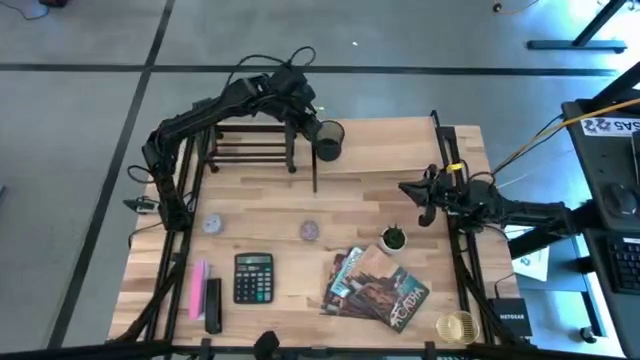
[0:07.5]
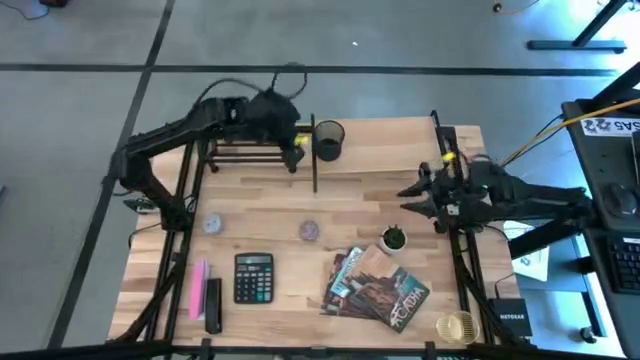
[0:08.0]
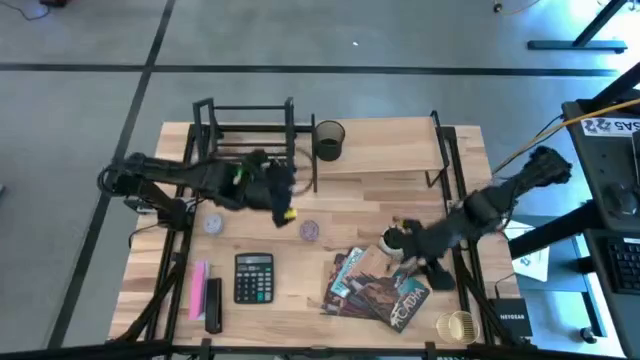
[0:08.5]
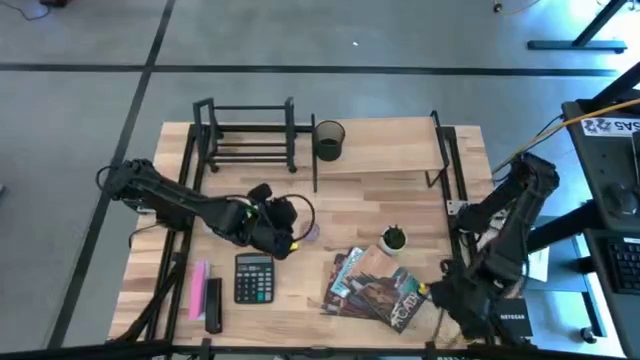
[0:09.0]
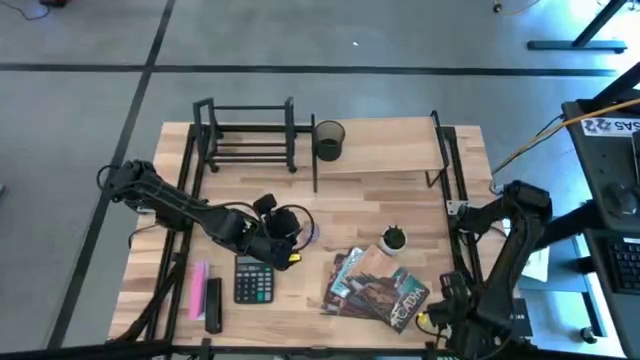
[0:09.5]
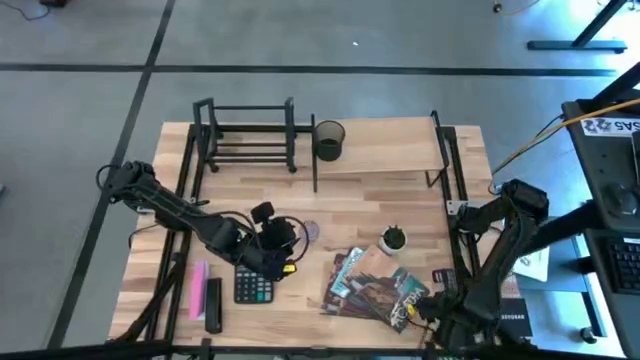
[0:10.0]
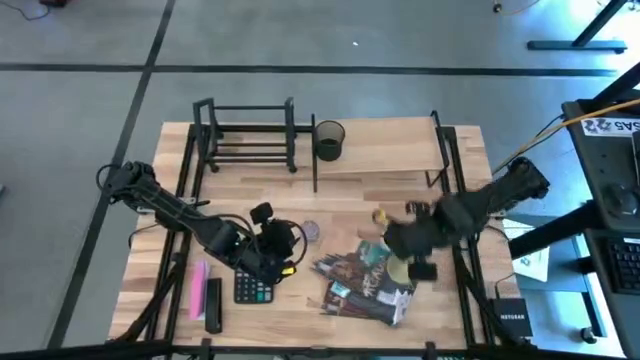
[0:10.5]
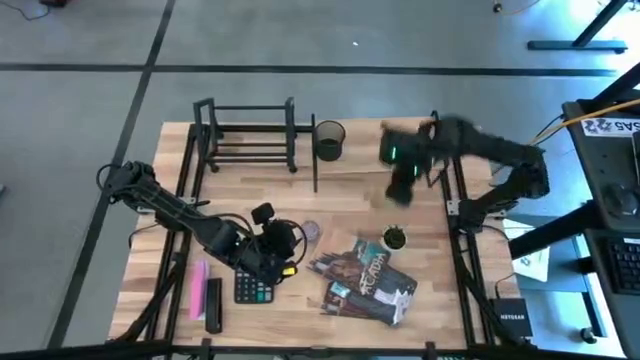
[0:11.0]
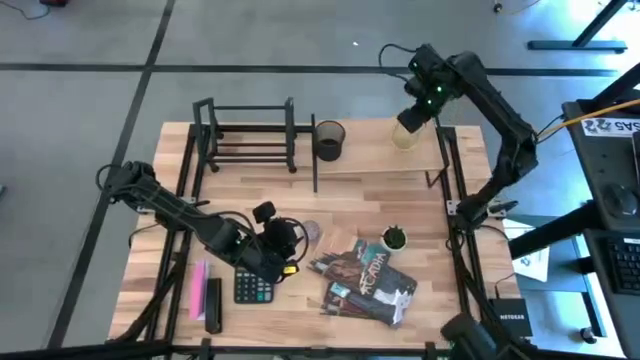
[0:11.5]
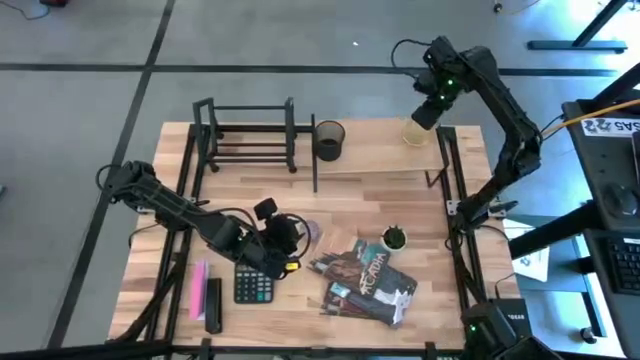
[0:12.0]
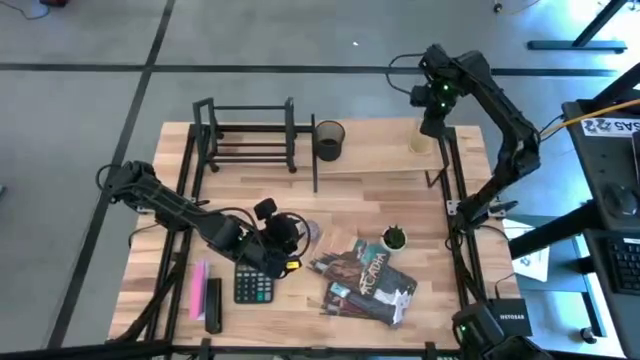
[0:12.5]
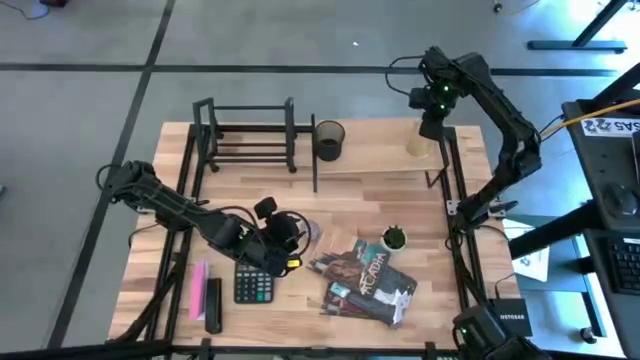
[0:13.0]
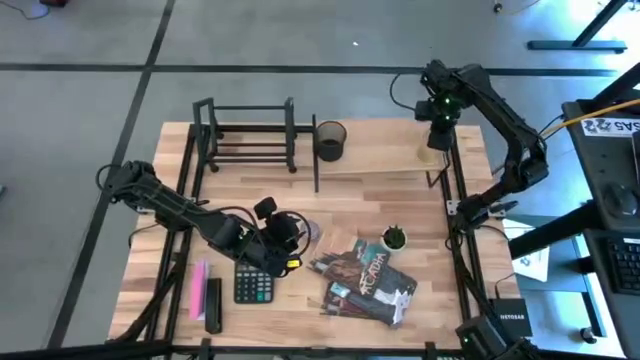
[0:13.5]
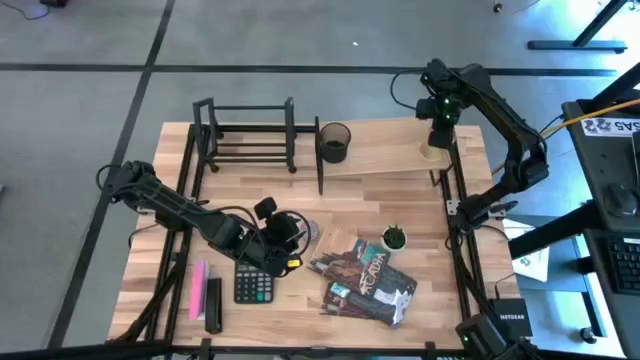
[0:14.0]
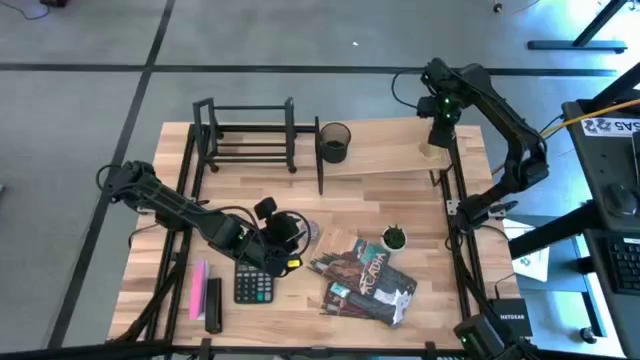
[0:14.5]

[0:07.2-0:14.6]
Task: Stock shelves
Put the gold pen organizer on the shelf

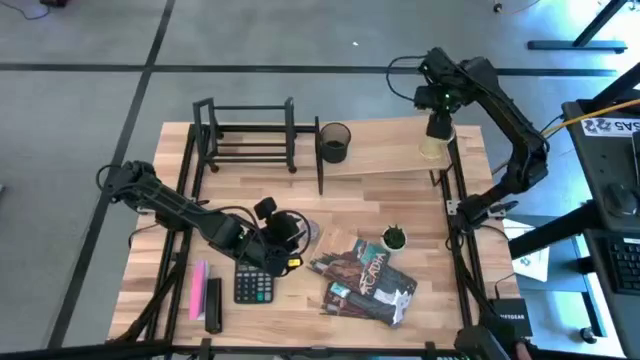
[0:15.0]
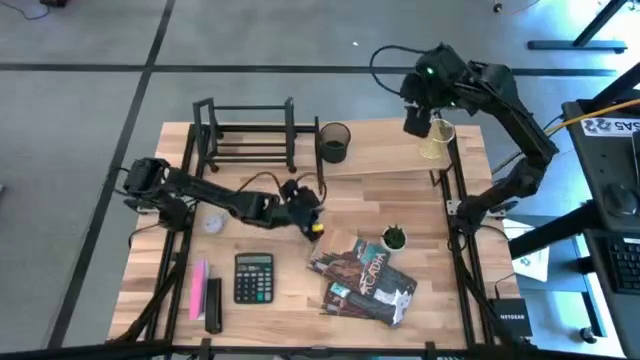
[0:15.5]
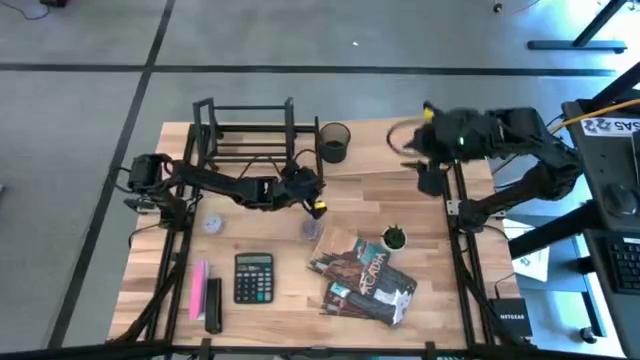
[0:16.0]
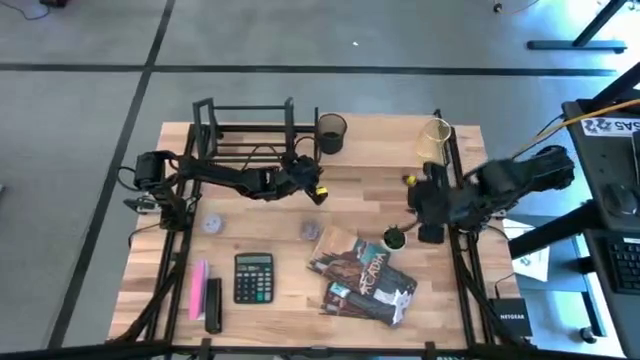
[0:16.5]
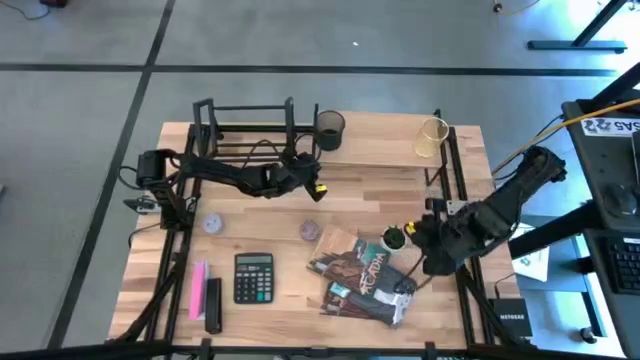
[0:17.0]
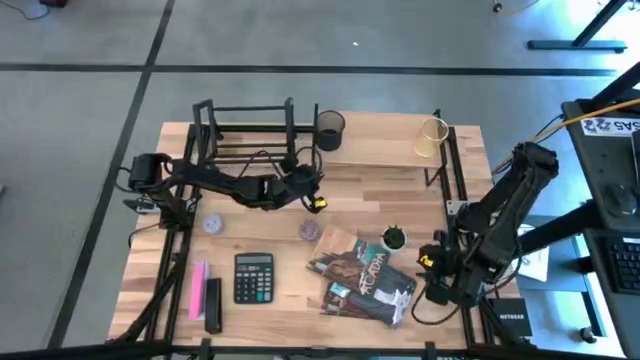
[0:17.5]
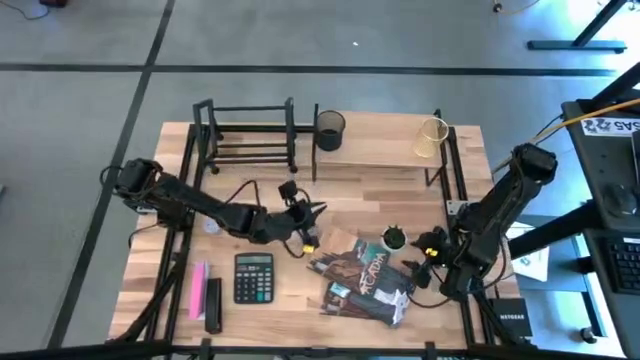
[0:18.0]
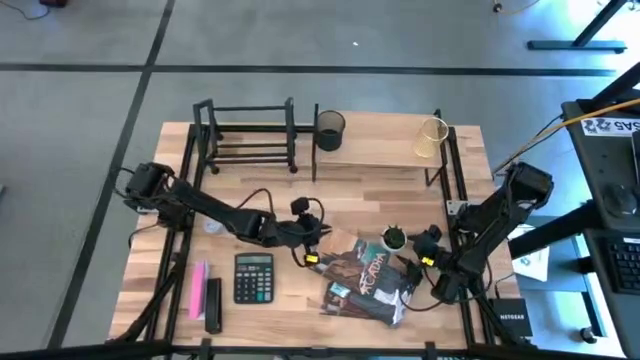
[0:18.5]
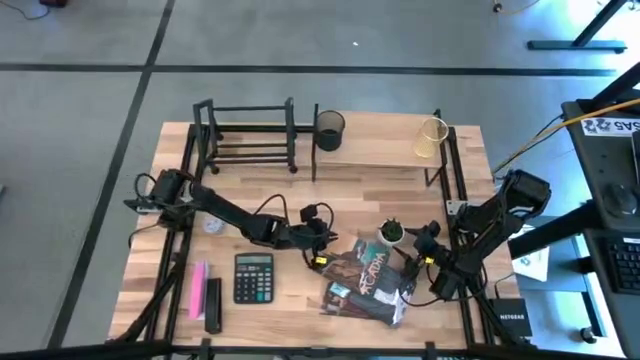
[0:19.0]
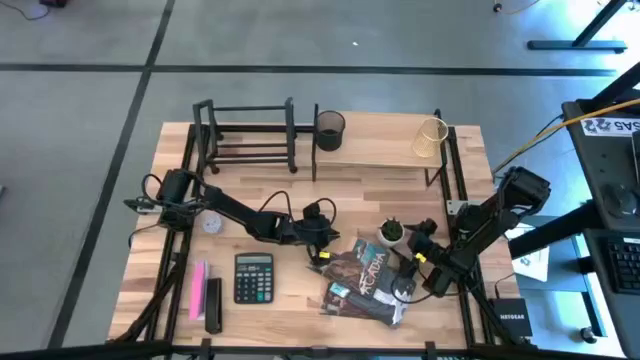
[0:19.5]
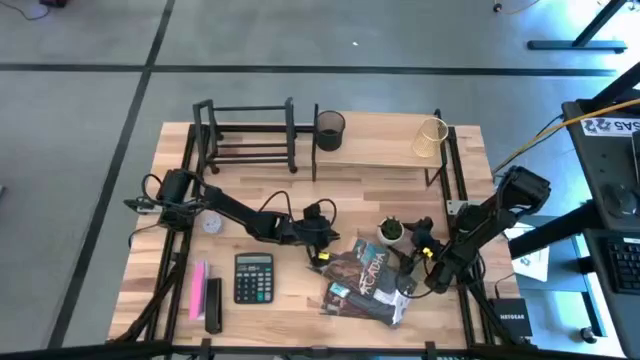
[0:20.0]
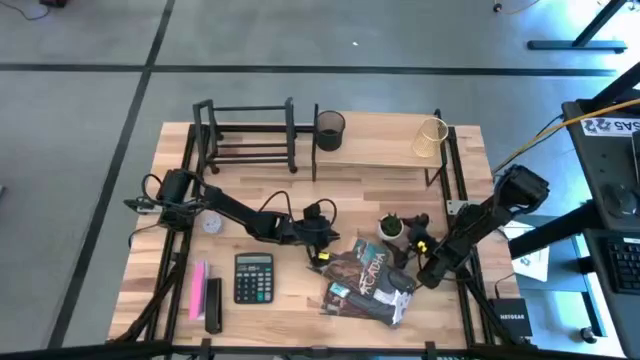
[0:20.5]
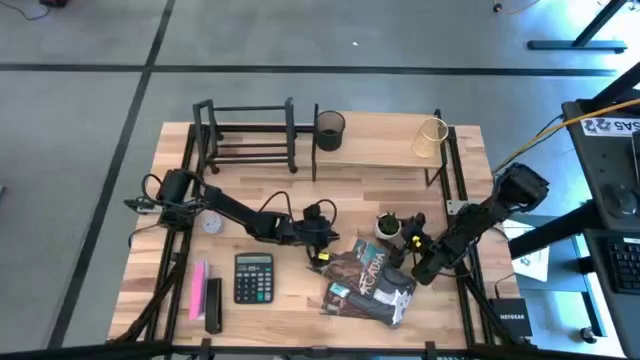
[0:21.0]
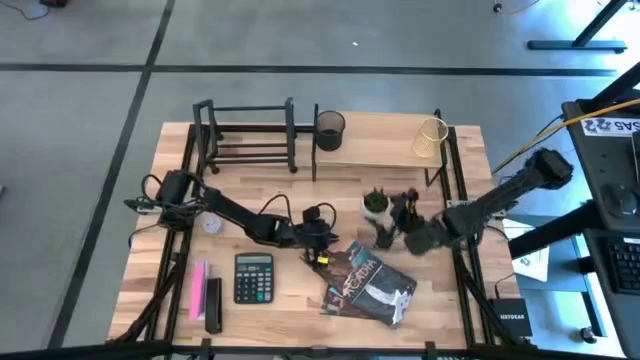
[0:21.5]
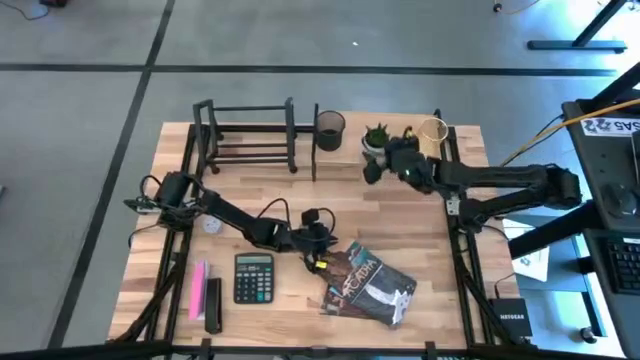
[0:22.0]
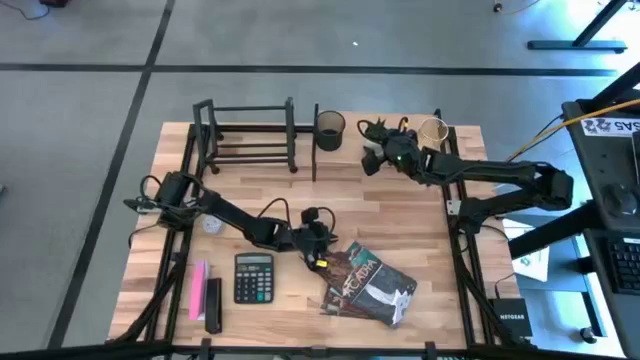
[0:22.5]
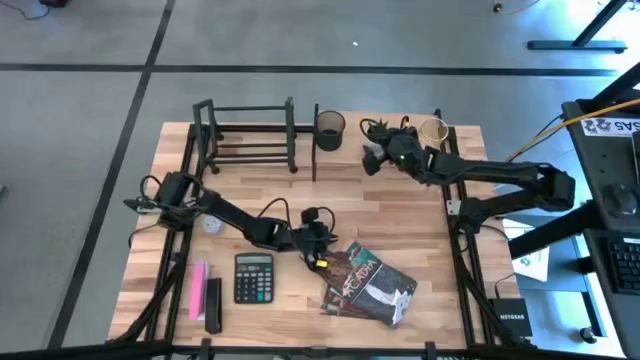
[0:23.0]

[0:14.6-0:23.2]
Put the flower vase on the shelf

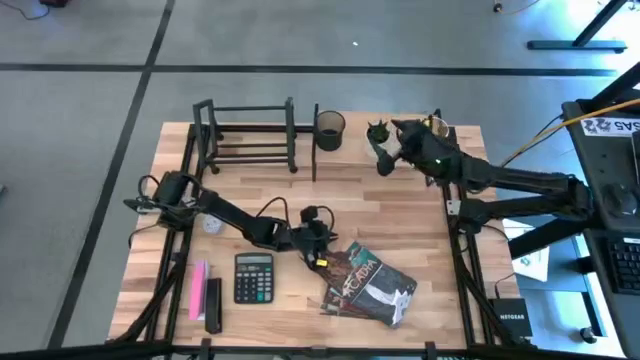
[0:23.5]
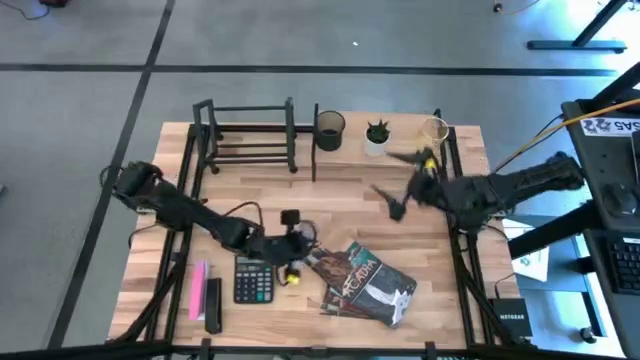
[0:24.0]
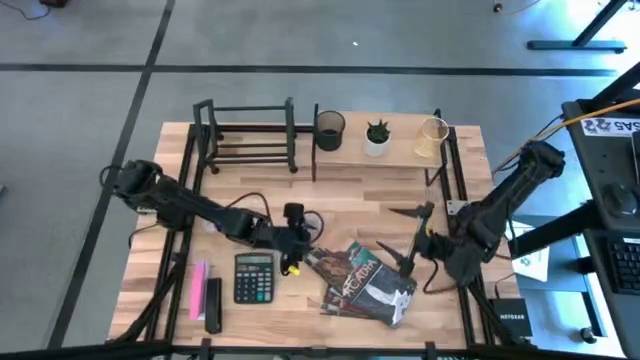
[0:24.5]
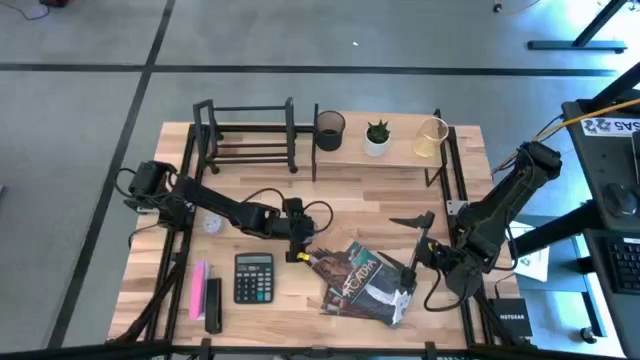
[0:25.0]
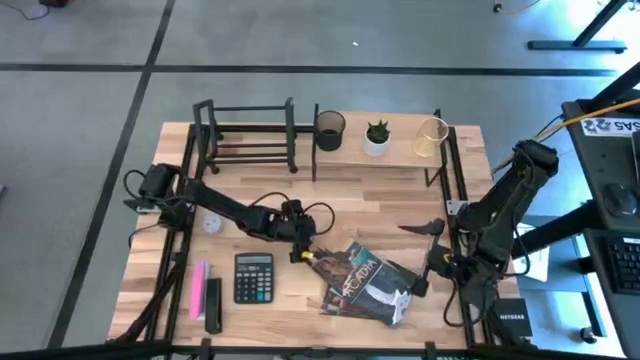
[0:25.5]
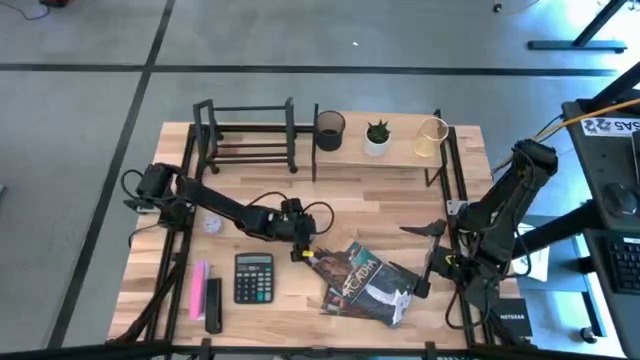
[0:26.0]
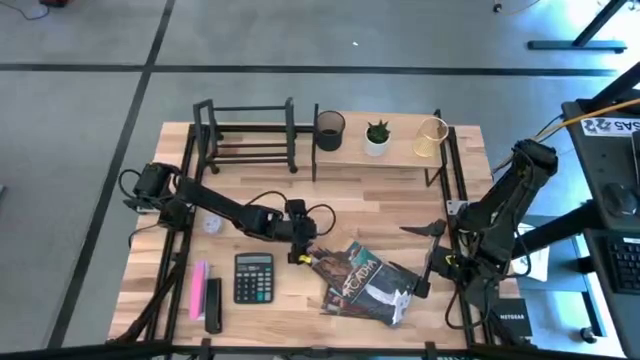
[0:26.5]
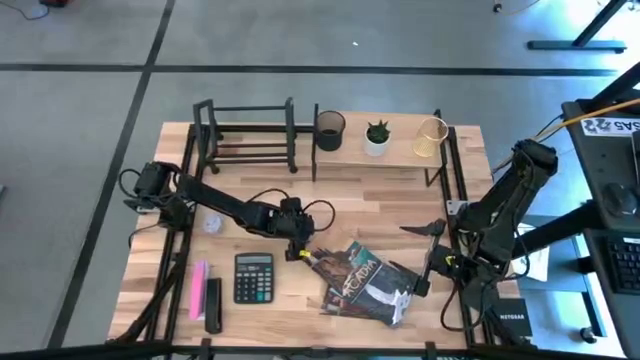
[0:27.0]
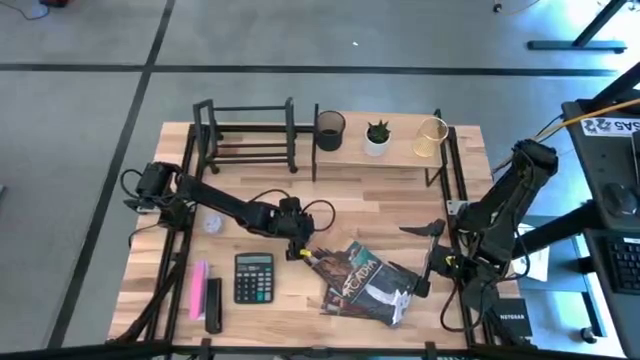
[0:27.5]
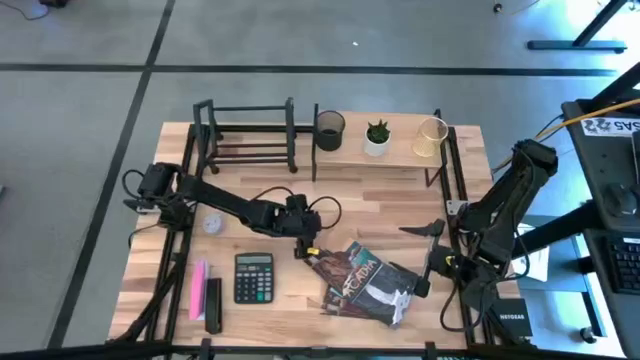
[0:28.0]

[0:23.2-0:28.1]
Put the red scented candle jar under the shelf
